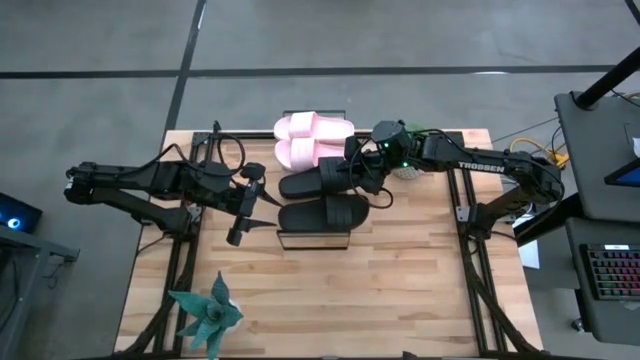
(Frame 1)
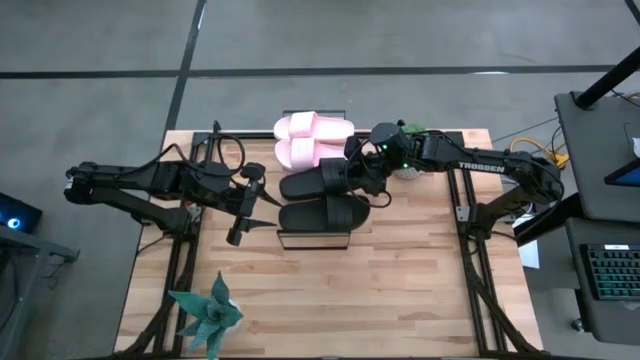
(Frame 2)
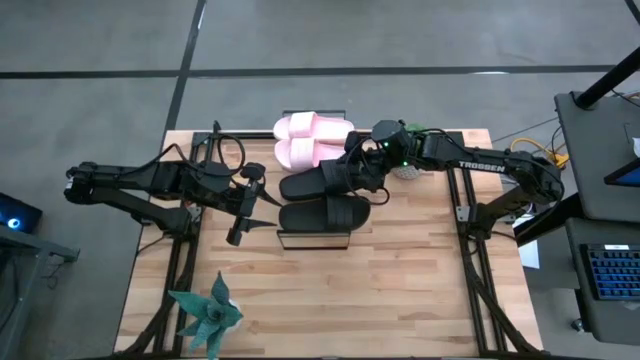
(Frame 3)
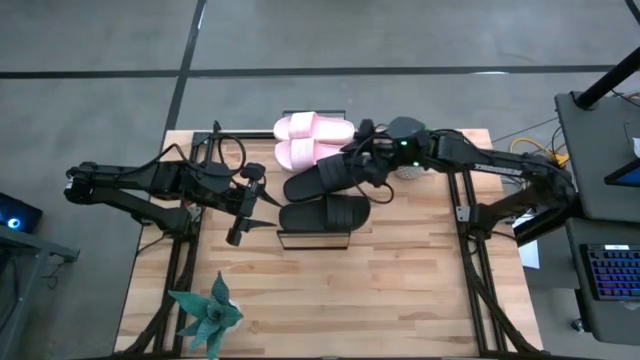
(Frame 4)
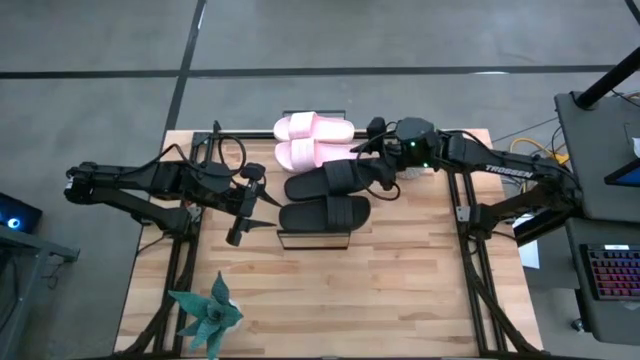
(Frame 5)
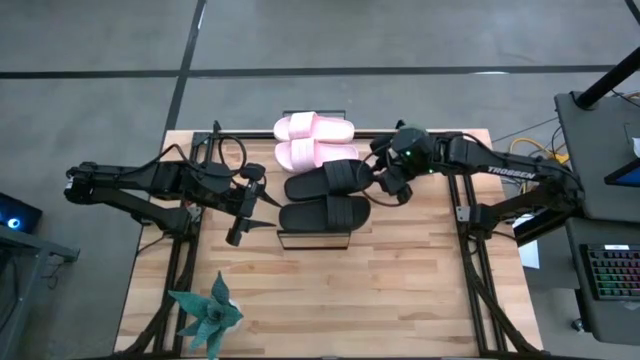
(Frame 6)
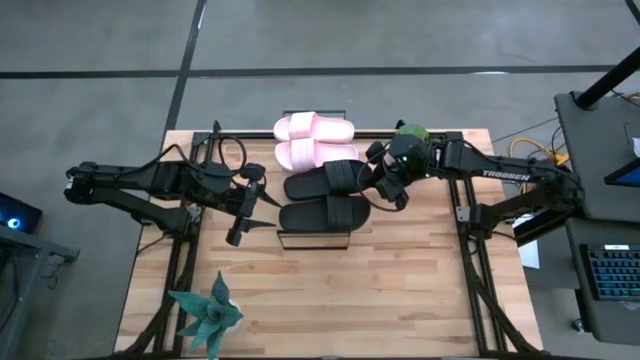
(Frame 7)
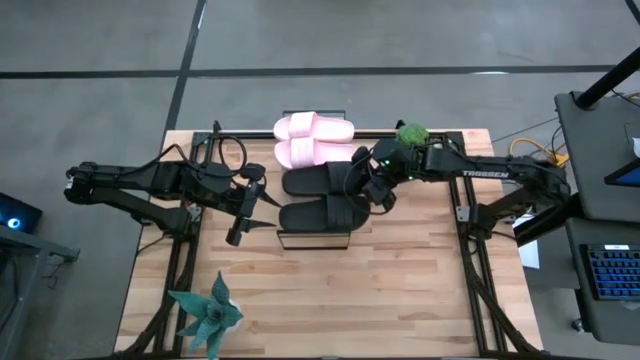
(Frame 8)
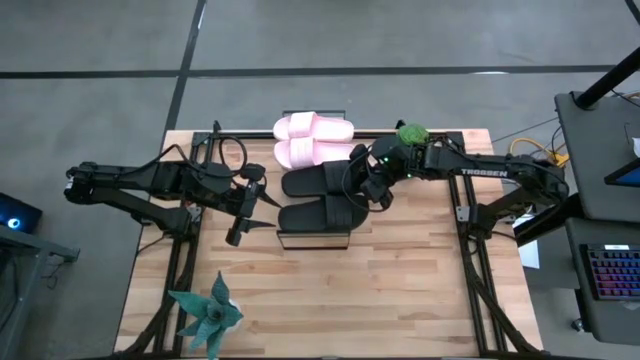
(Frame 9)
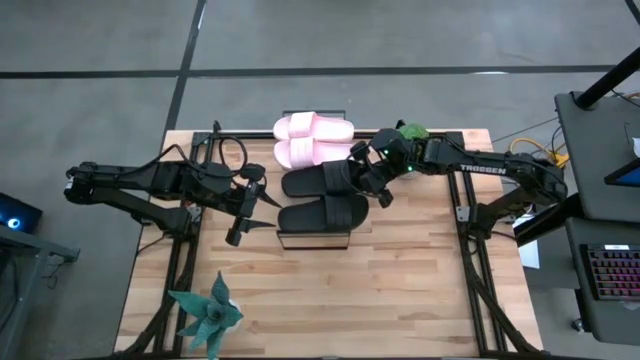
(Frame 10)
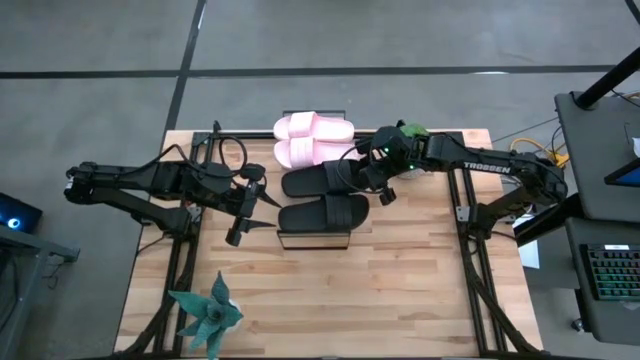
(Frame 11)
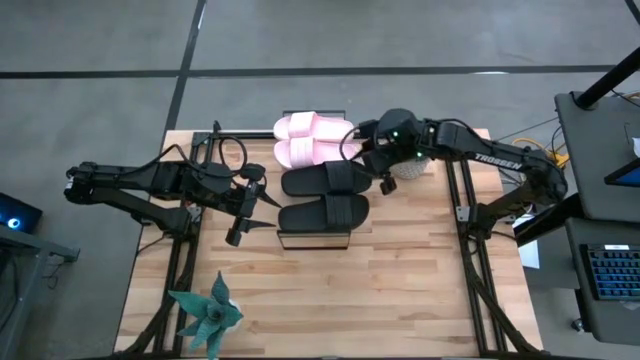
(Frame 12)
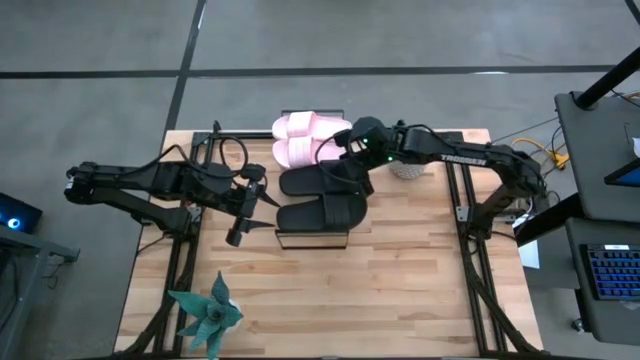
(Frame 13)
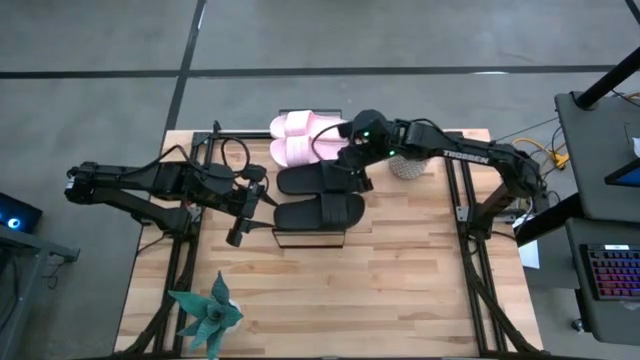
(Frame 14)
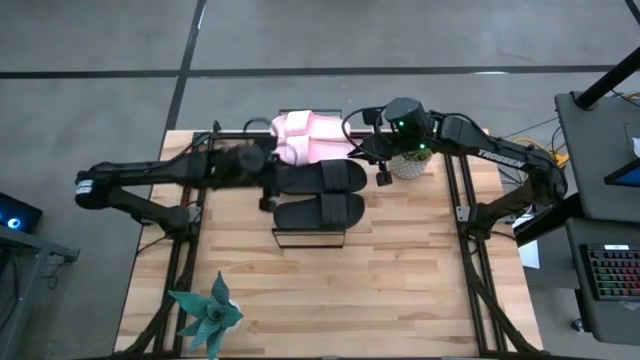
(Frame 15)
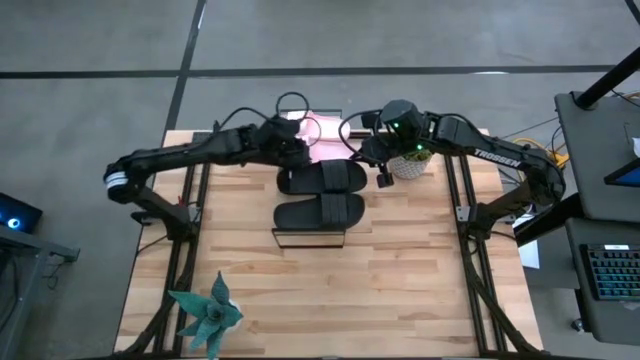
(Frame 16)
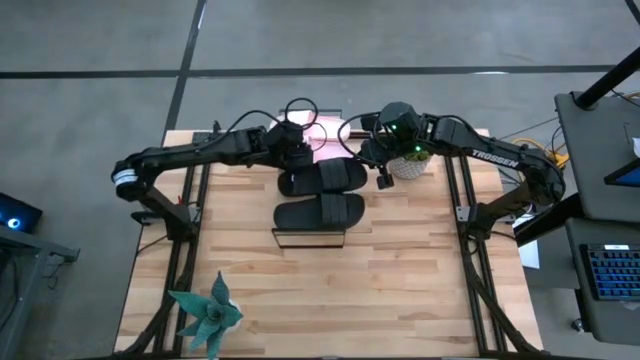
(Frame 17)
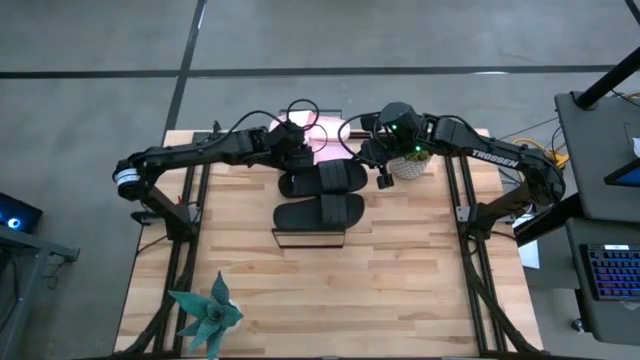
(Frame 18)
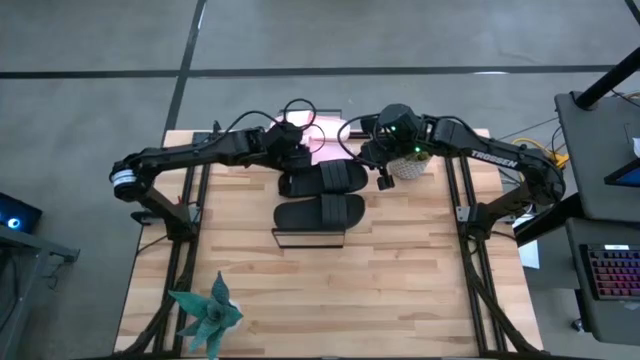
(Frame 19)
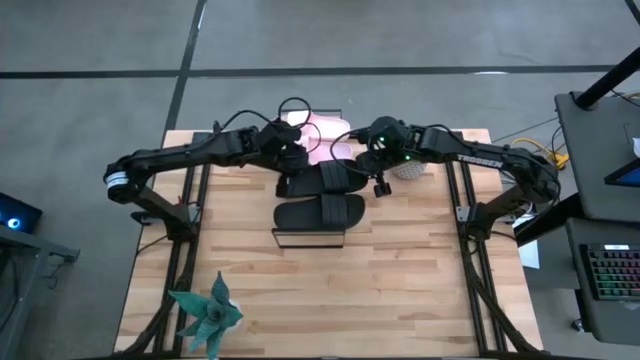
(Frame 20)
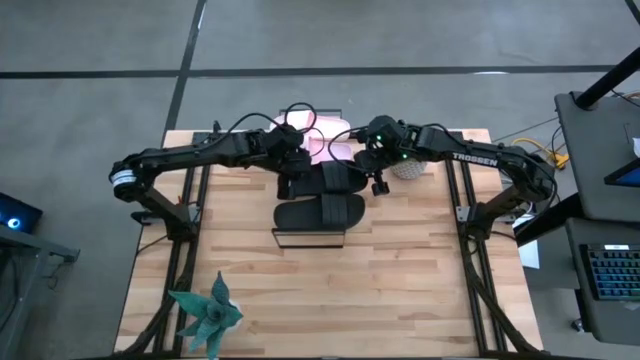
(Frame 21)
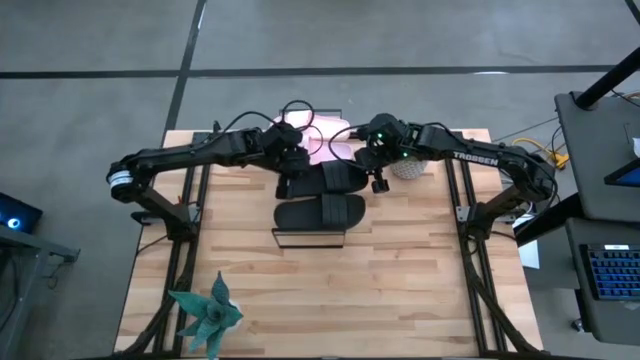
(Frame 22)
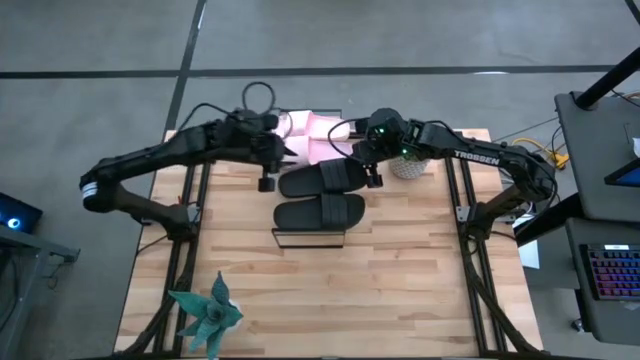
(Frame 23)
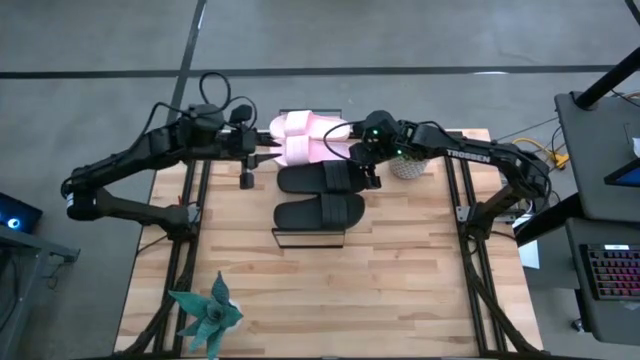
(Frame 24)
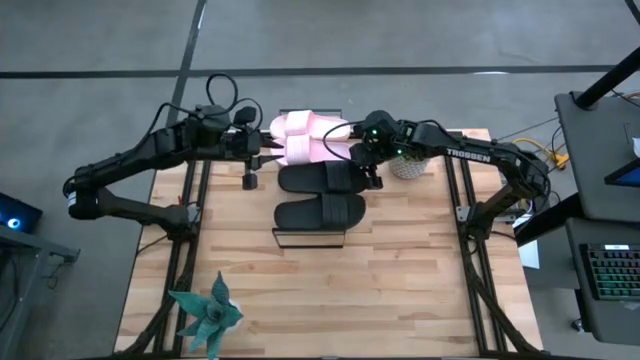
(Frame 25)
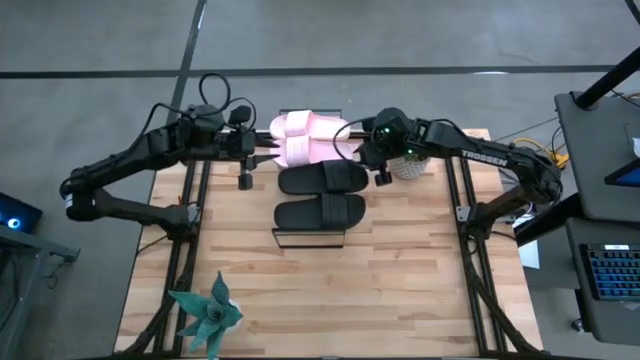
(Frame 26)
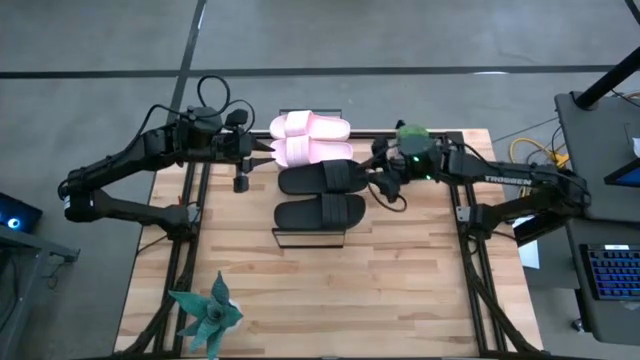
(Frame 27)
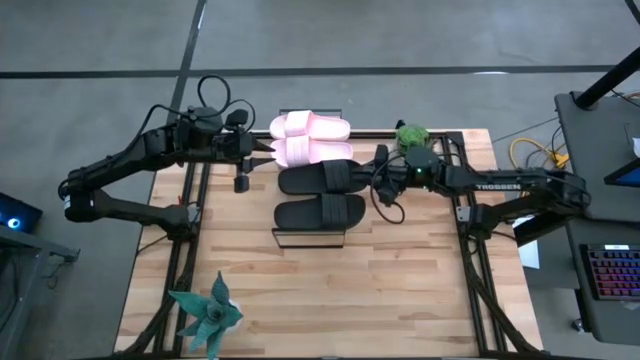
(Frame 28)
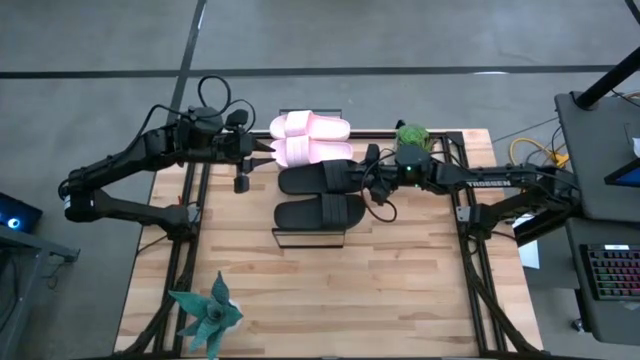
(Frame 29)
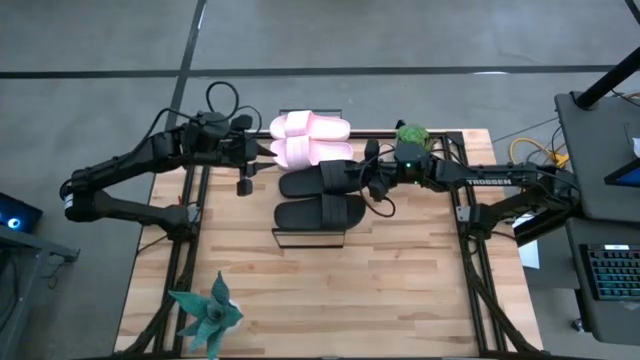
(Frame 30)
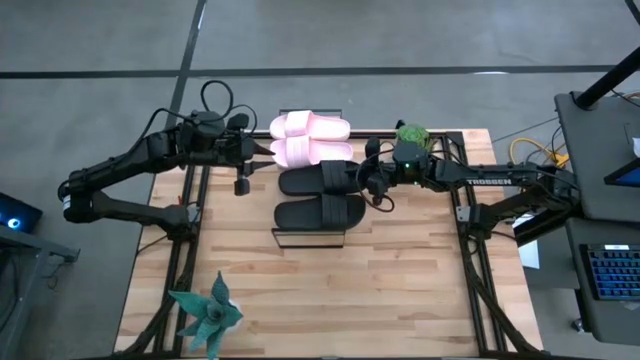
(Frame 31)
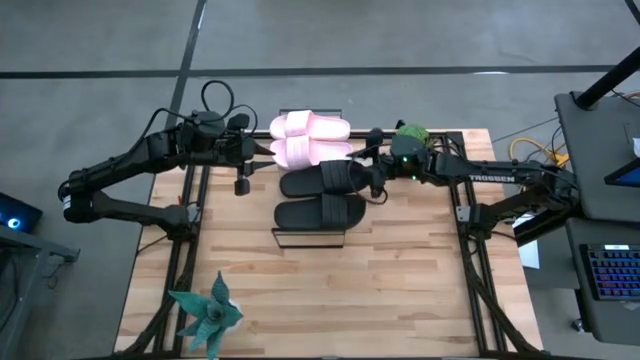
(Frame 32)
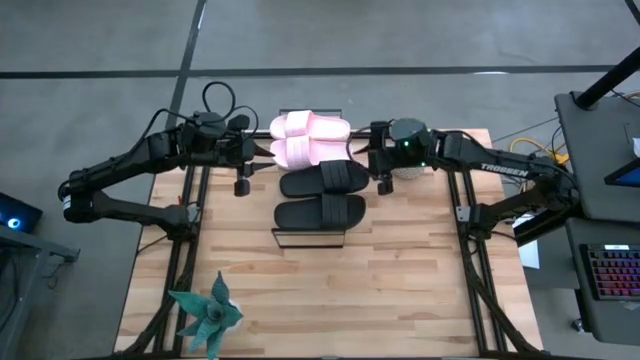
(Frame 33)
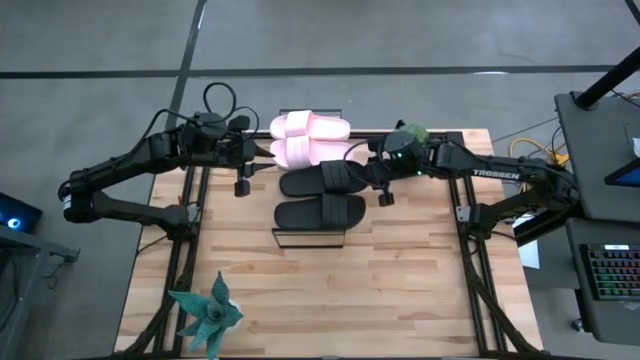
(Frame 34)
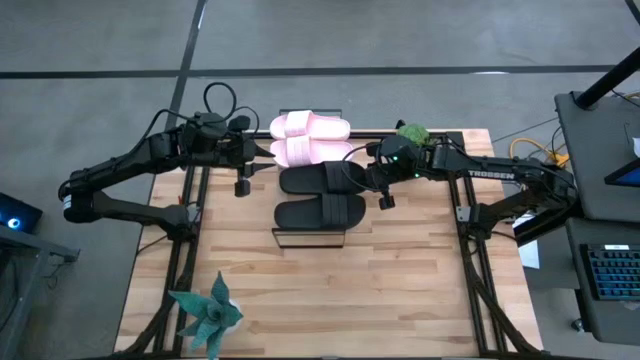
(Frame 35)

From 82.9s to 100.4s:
Task: Pick and place slides into the shelf
Put the black slide on the shelf

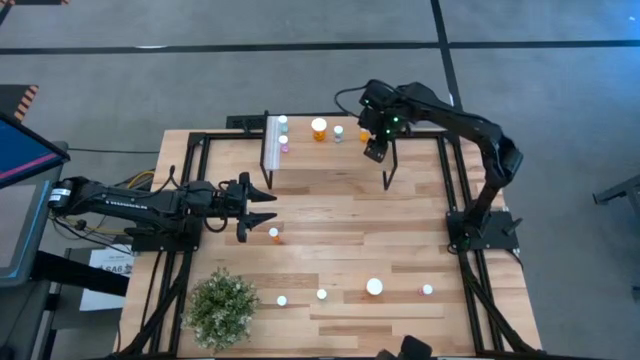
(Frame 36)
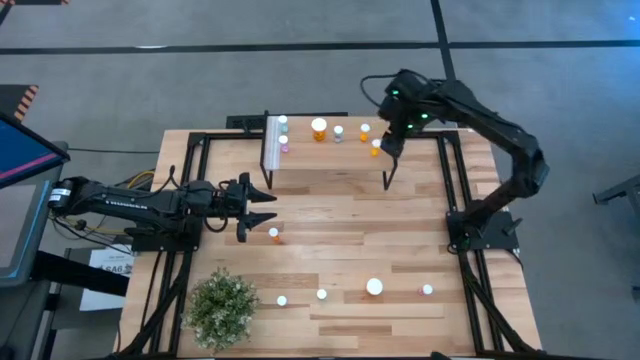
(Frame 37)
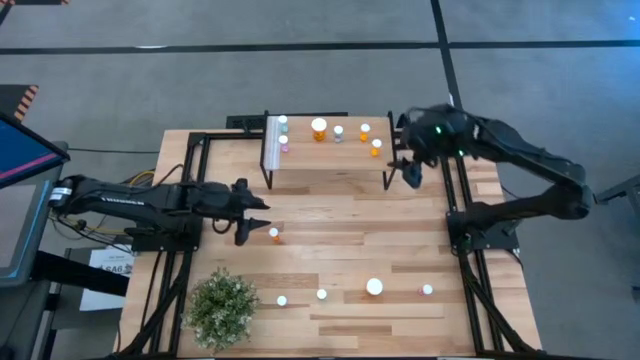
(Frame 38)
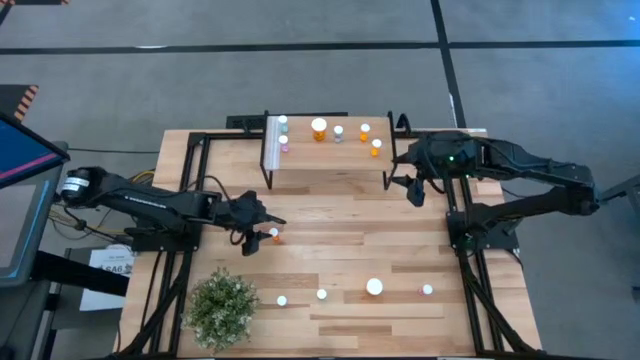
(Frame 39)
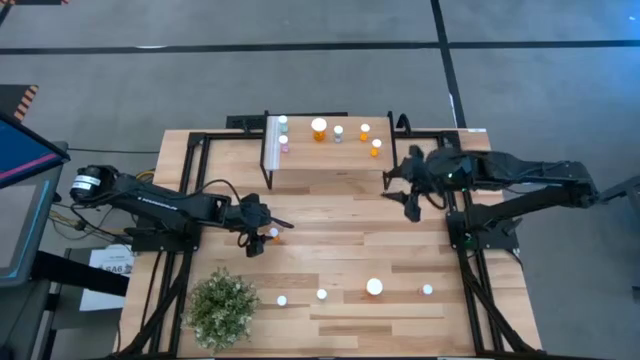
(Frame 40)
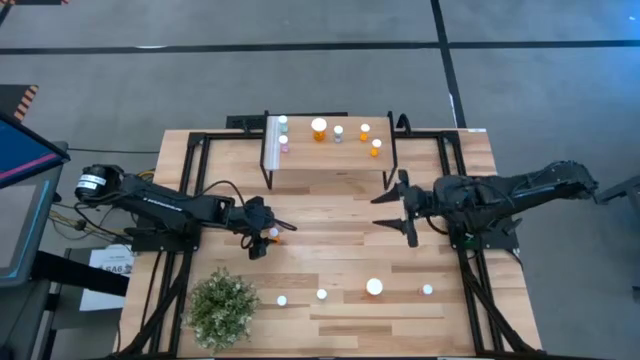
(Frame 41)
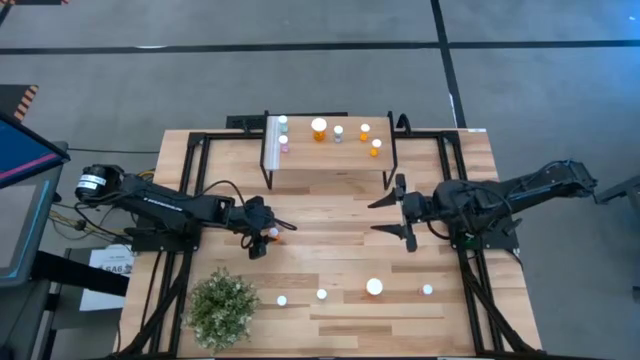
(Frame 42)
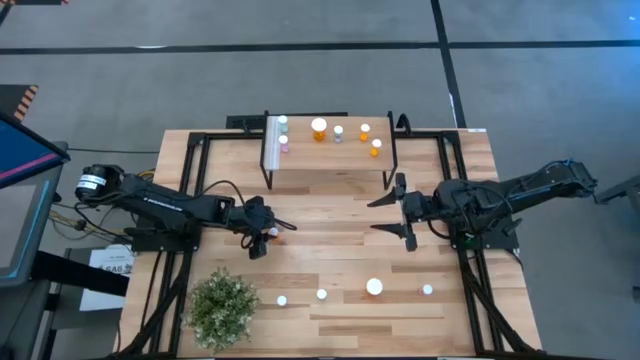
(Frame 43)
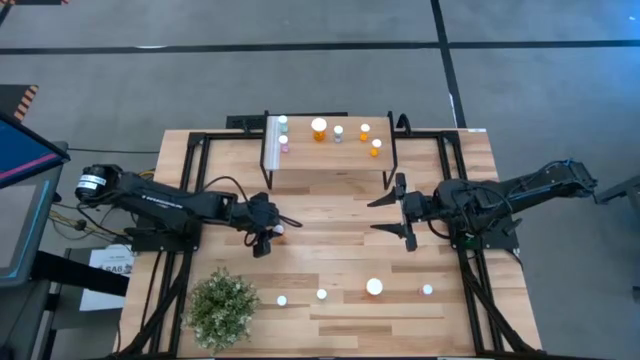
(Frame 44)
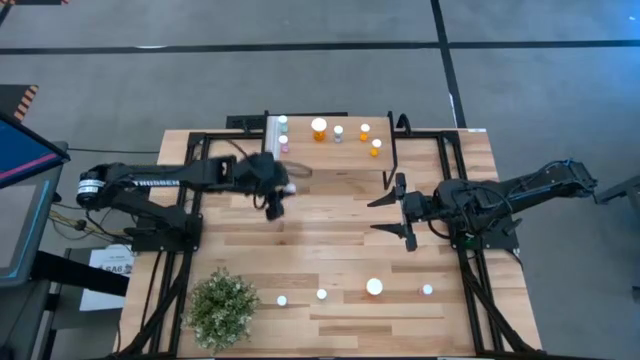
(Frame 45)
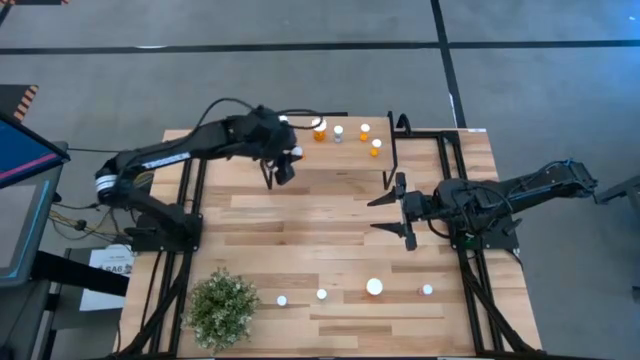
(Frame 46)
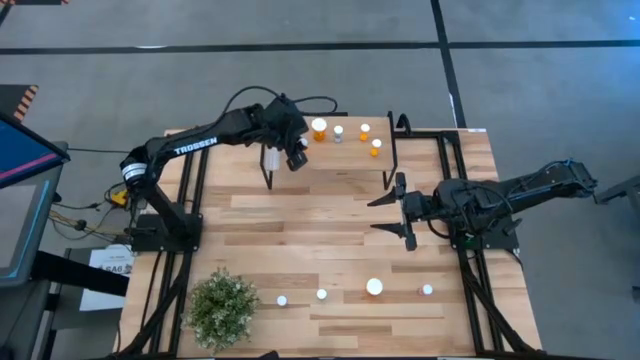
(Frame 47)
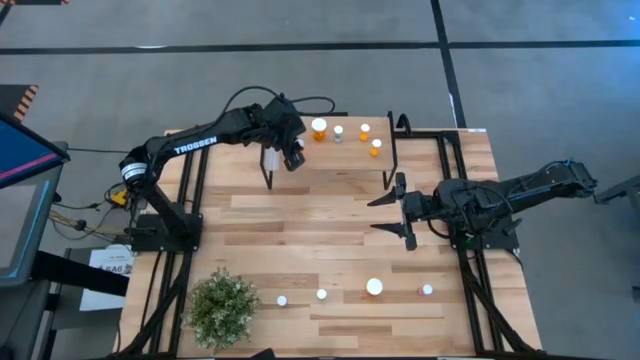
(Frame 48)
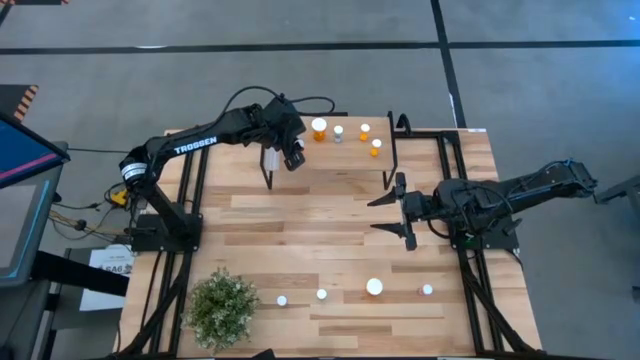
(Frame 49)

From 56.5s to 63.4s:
Task: Pick and place medicine bottles onto shelf by color
Put the small orange pill bottle on the shelf
